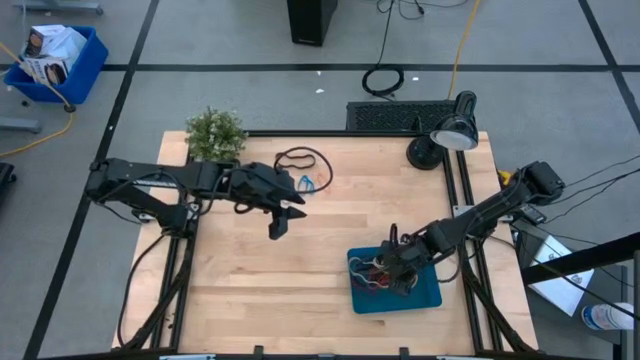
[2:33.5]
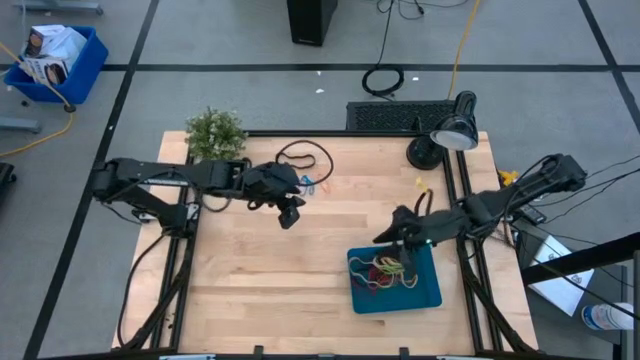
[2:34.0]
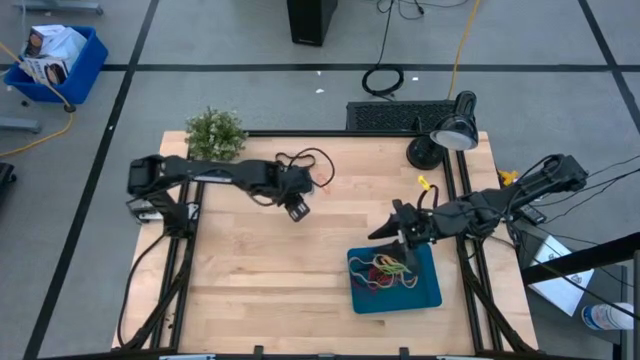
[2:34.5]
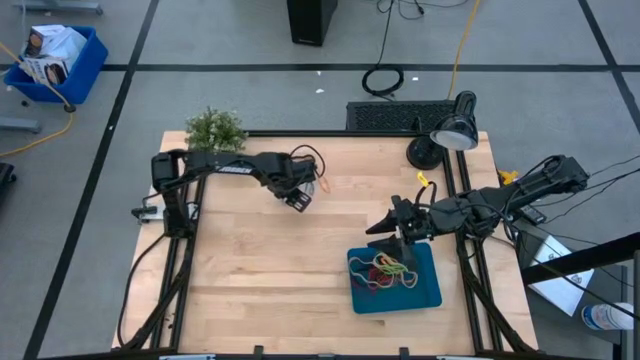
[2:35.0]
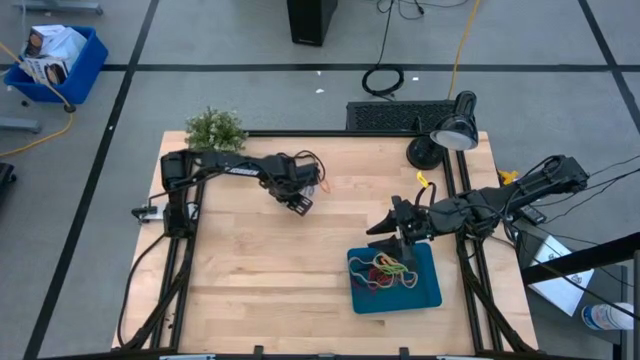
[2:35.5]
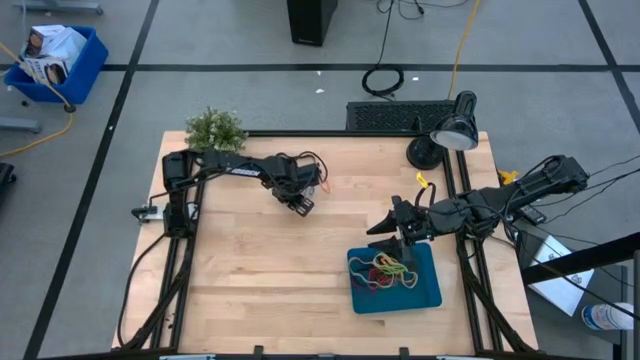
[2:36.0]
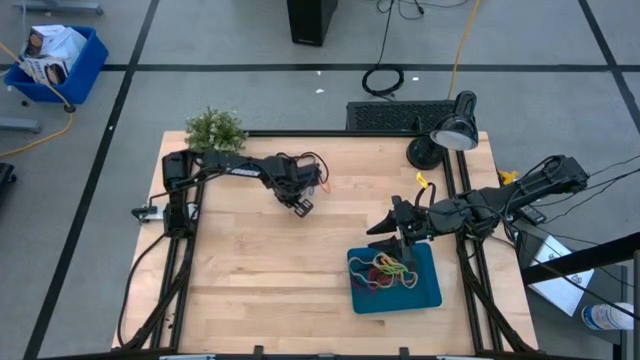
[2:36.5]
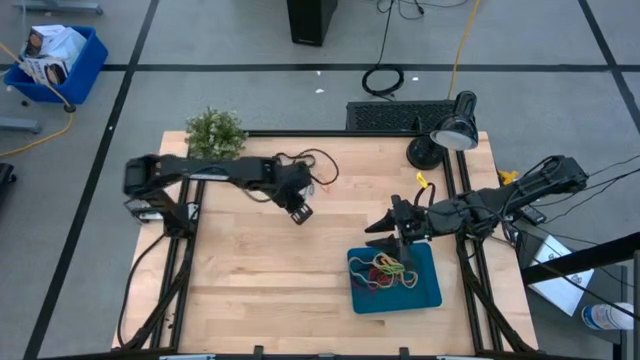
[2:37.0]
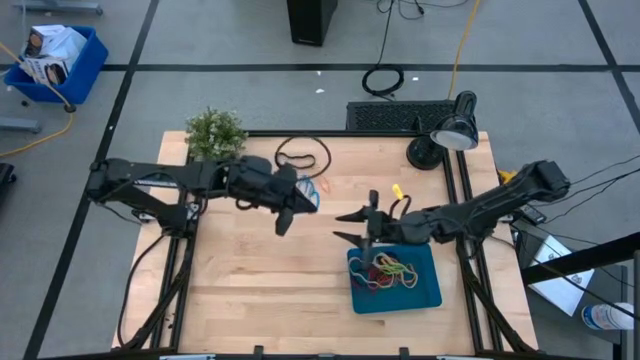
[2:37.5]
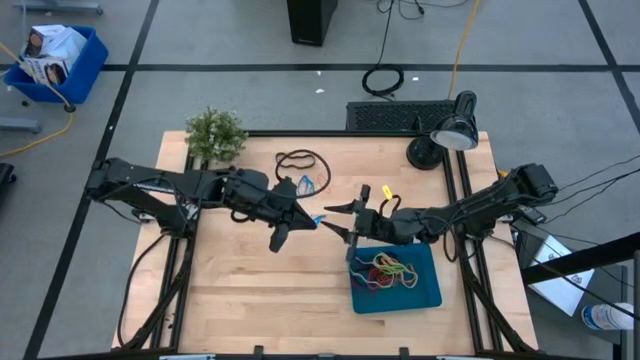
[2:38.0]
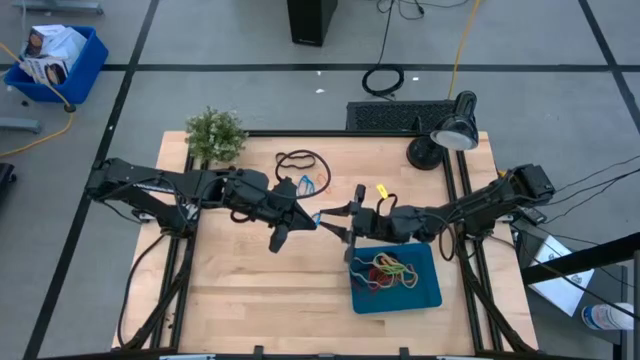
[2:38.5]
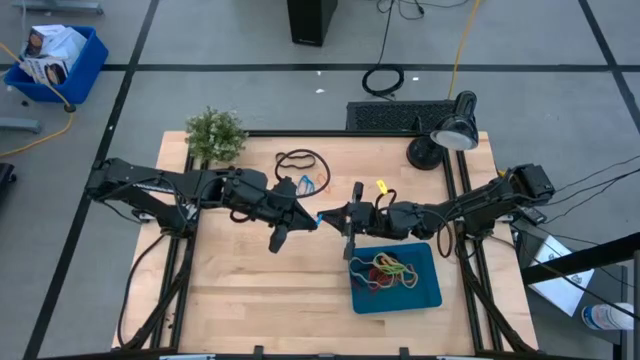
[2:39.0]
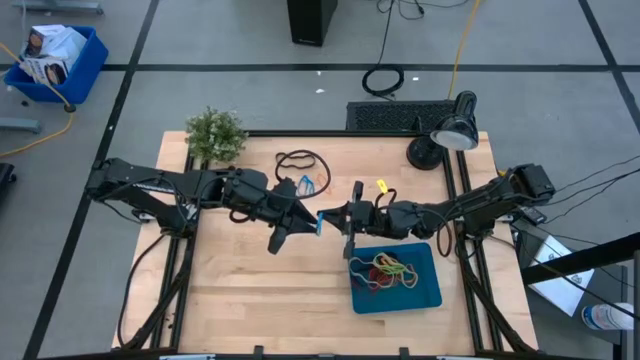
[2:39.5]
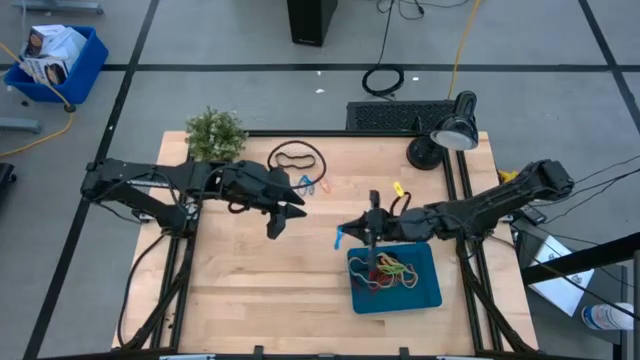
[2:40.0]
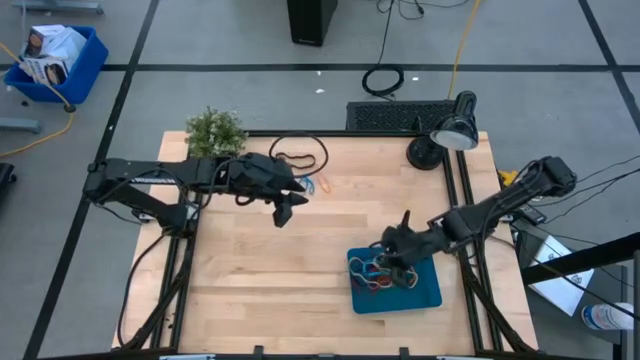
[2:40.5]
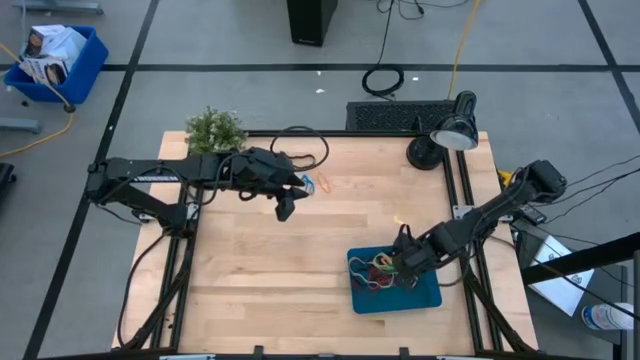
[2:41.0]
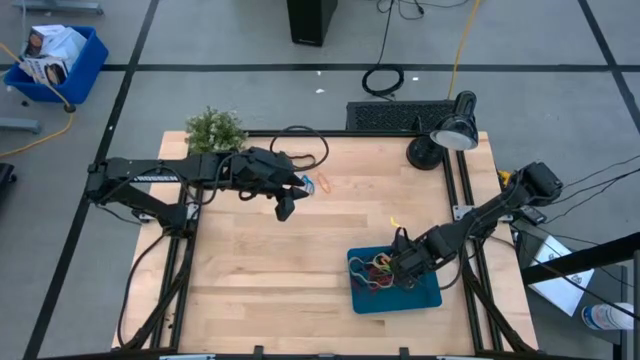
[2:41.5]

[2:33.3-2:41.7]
Task: Pick and place rubber bands into bin
Put the blue rubber band into the blue bin

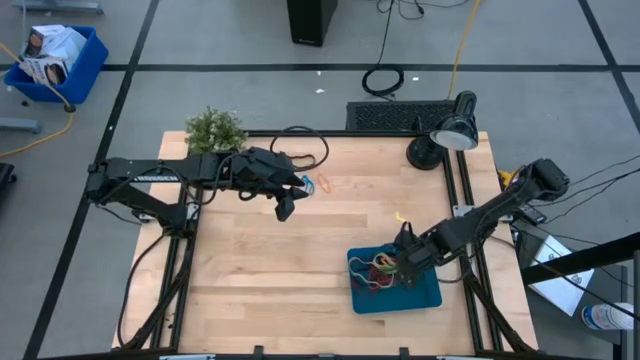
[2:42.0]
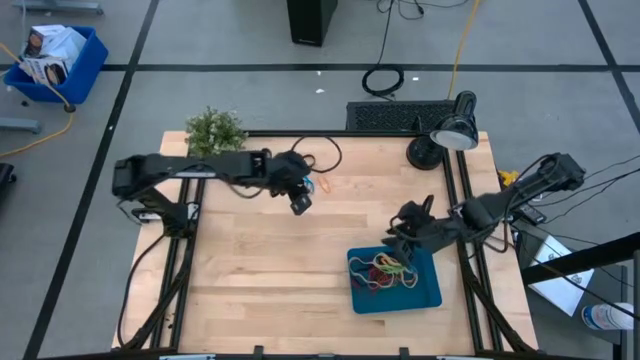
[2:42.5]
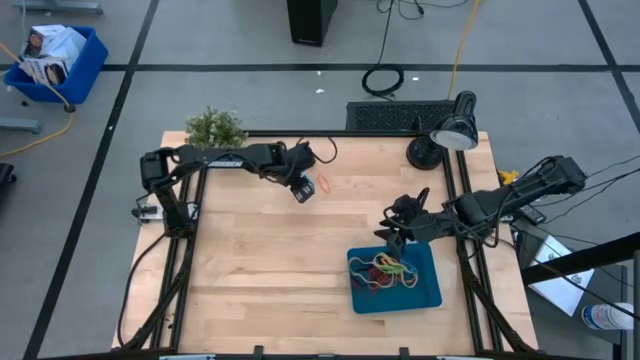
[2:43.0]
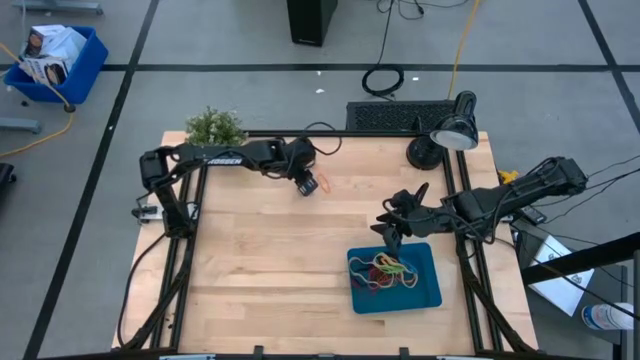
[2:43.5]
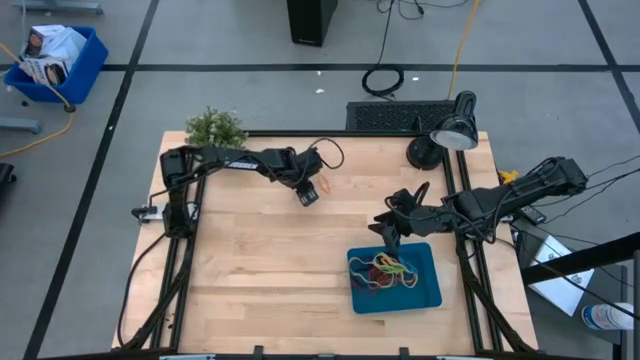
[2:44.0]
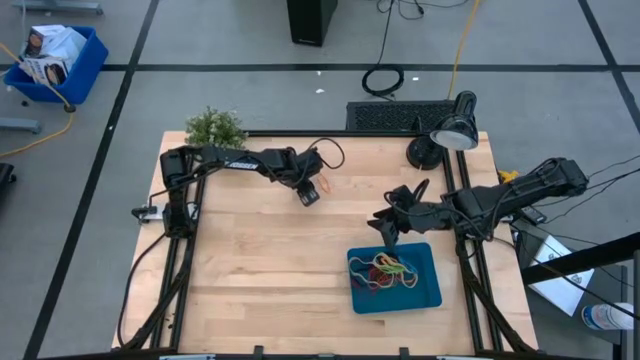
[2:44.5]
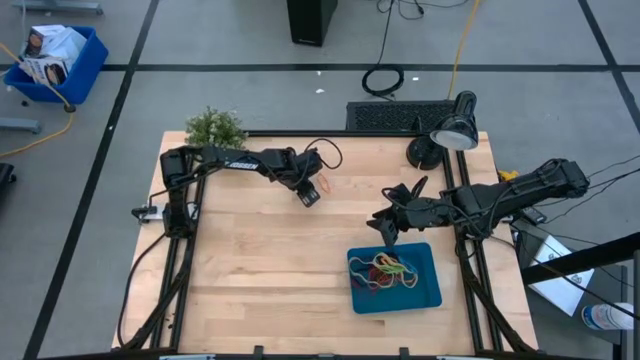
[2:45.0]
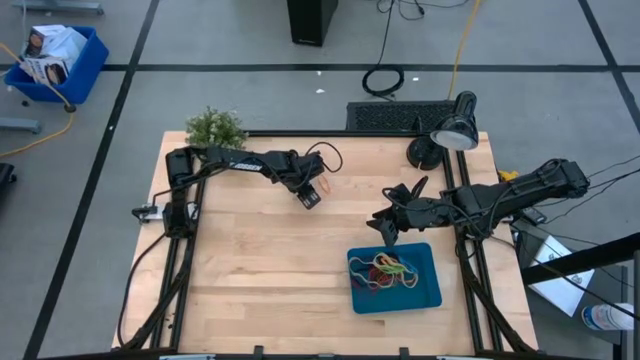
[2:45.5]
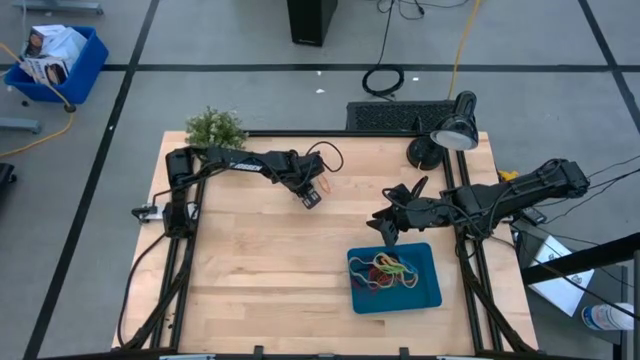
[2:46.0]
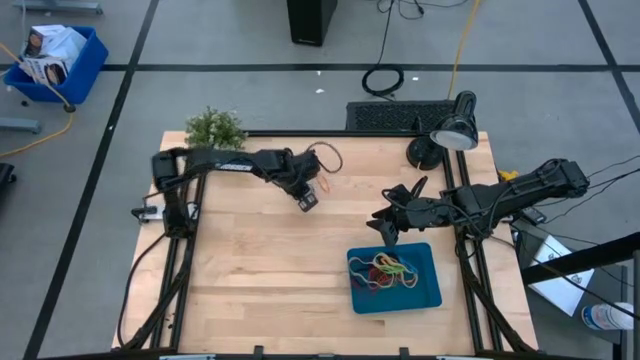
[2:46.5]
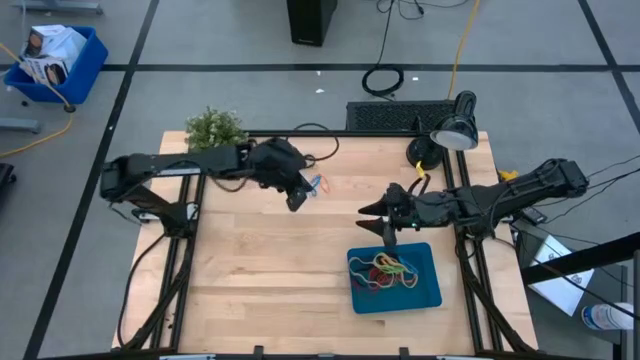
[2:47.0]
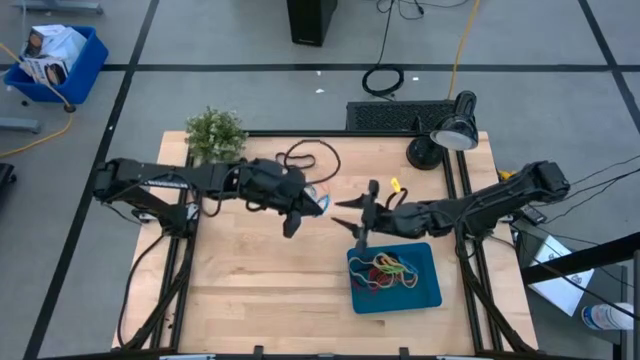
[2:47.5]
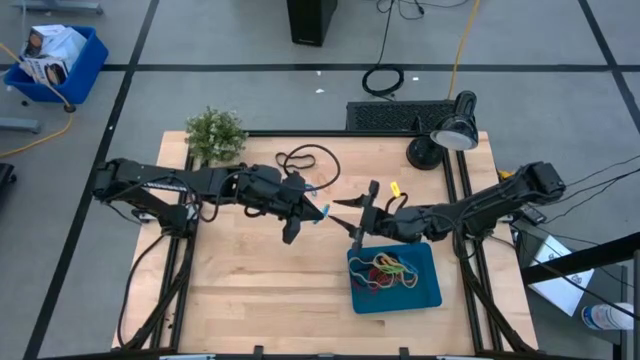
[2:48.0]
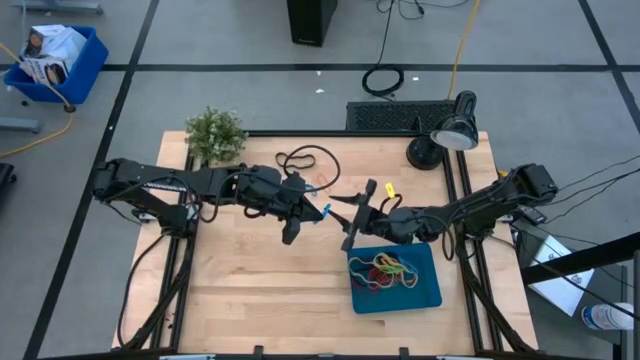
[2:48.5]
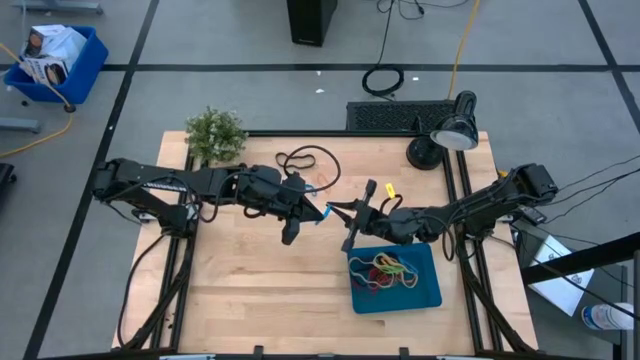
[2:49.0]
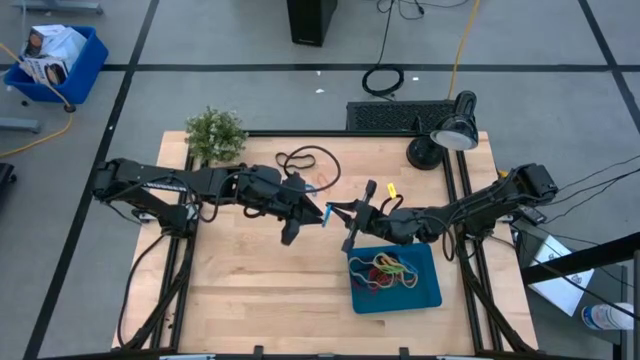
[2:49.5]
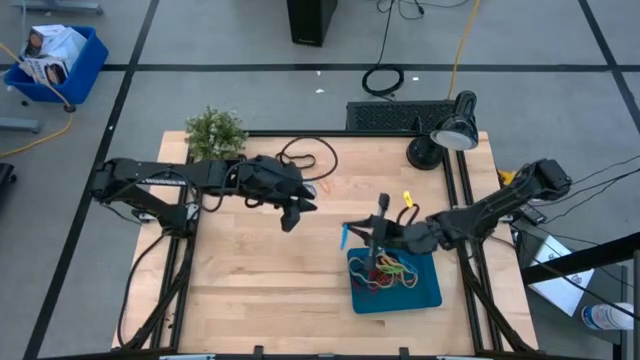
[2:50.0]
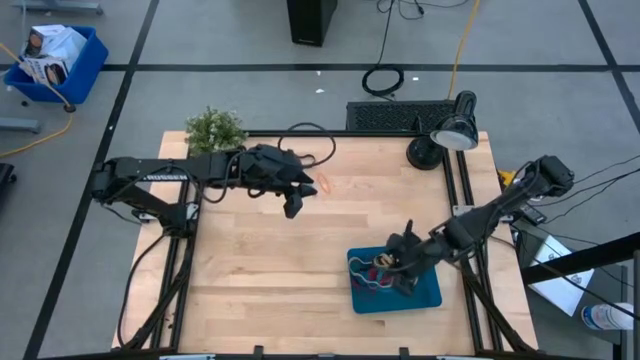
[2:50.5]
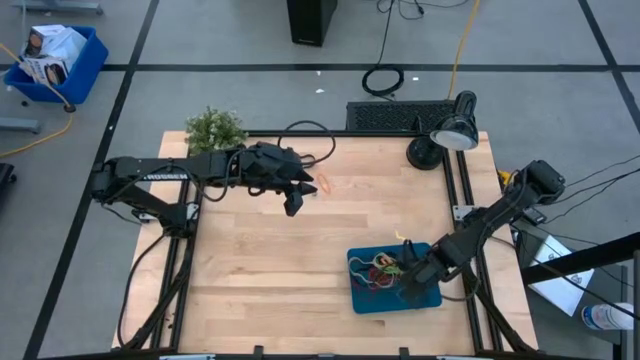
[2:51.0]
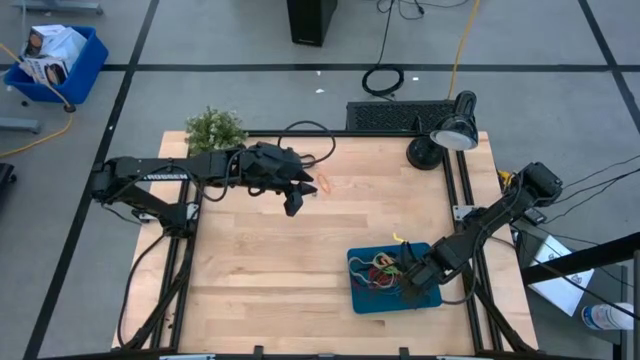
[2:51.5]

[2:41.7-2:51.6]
Put the blue rubber band into the blue bin

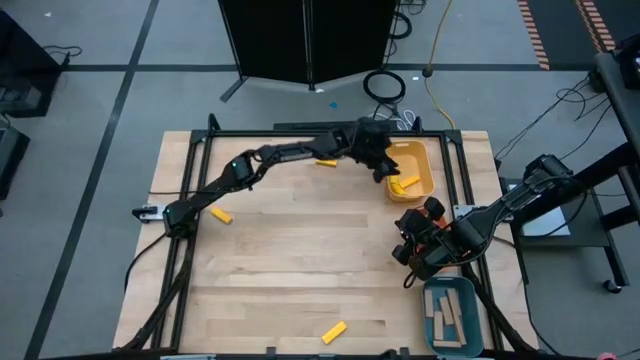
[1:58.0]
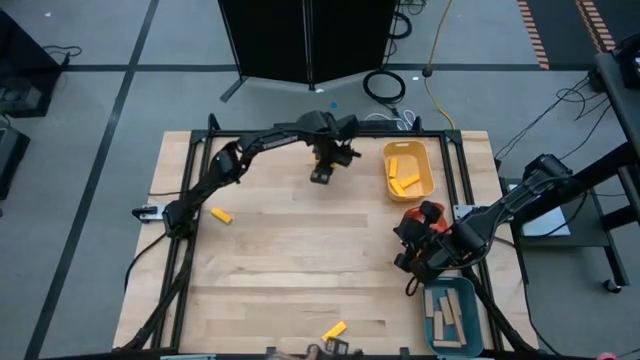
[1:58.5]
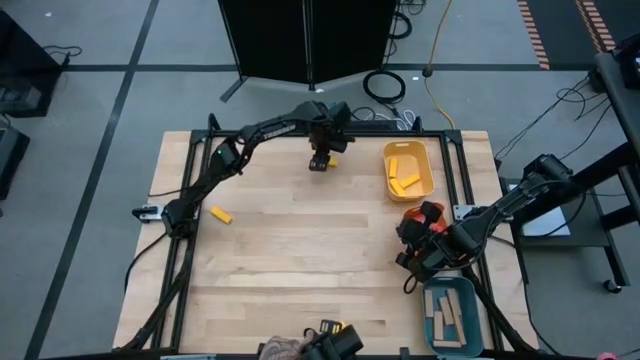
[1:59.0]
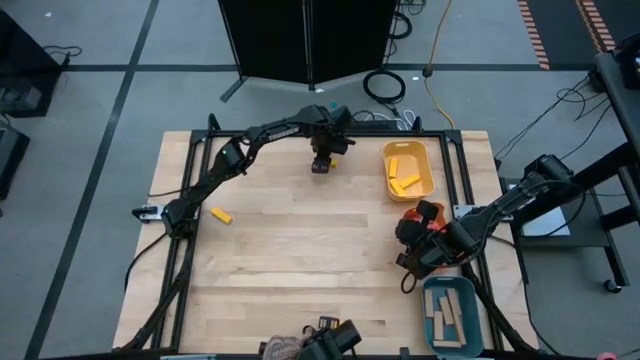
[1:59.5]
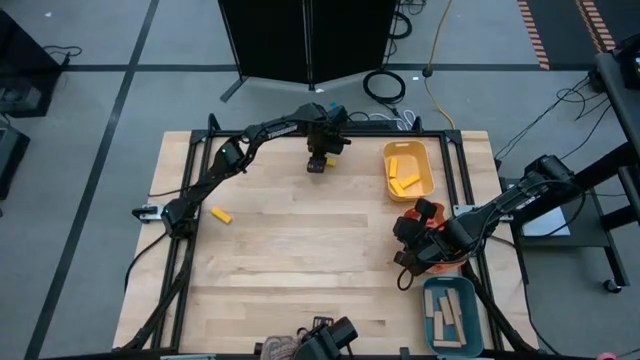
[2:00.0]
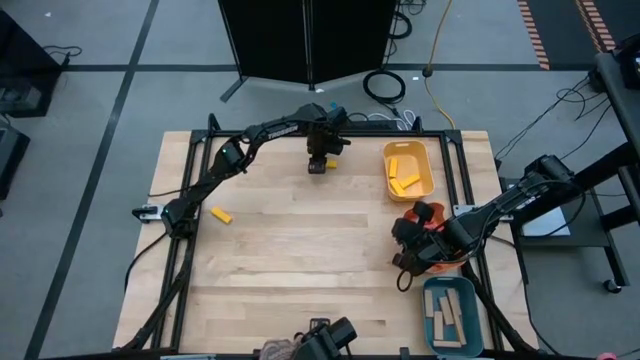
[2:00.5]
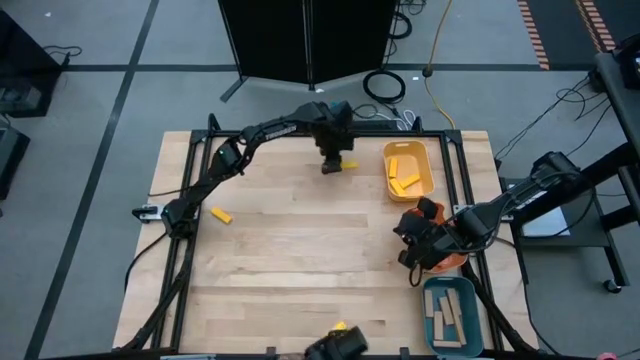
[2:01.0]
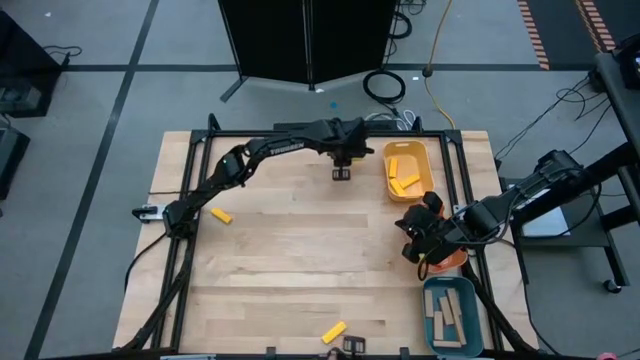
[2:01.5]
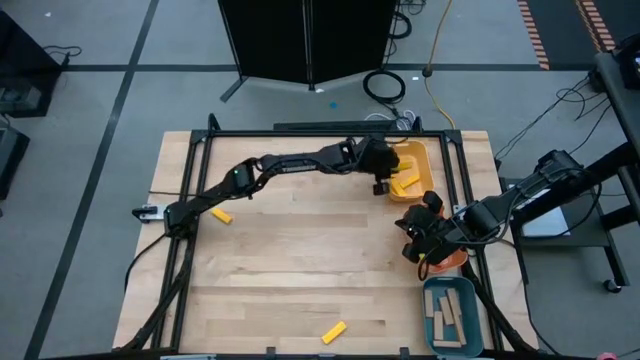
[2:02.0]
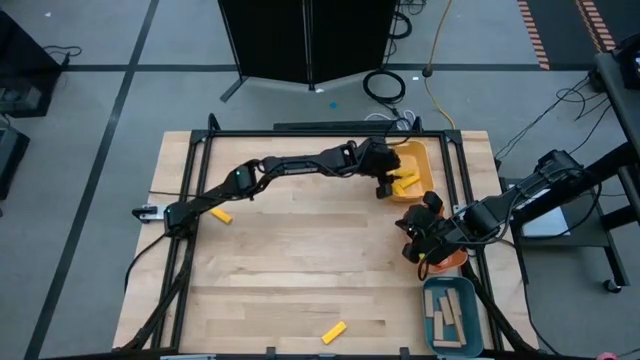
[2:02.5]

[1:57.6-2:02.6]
Task: Sort blocks
Put the yellow block into the yellow bin
